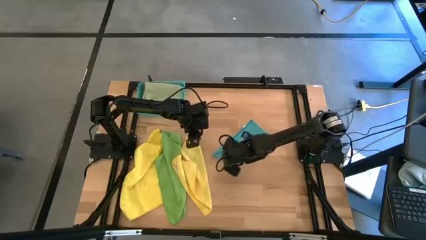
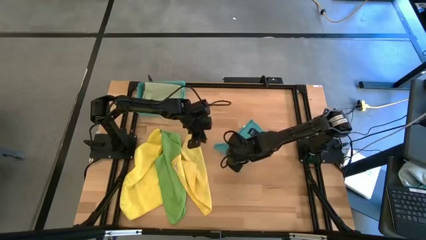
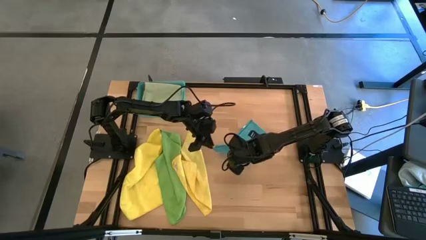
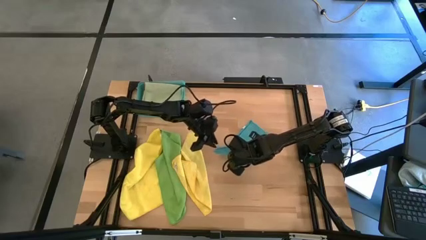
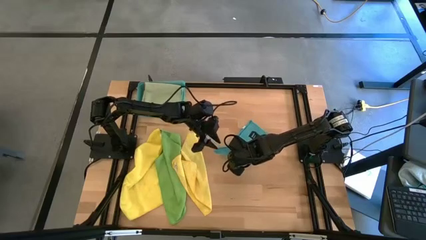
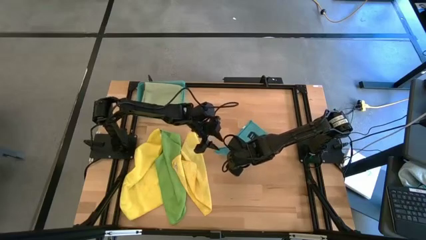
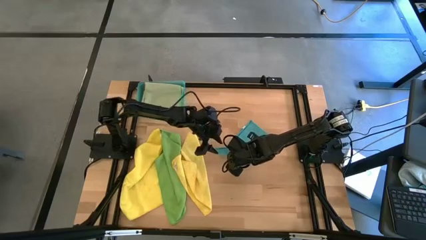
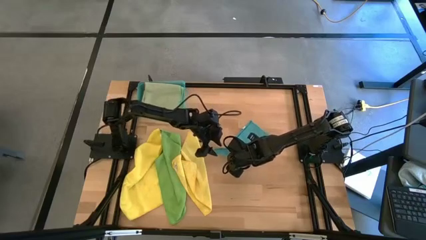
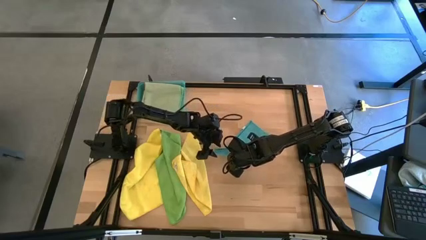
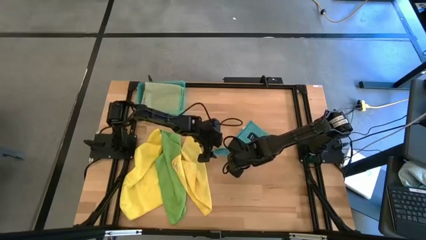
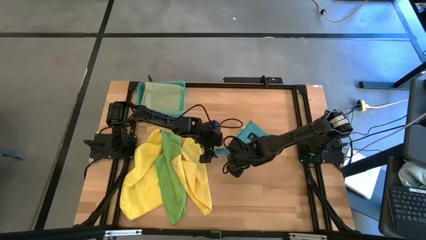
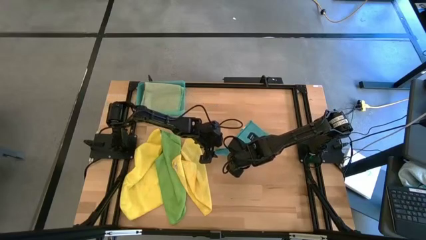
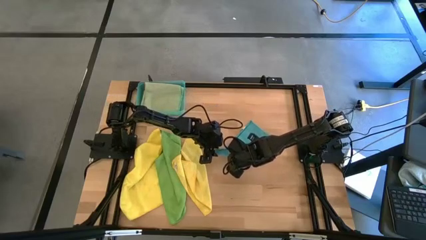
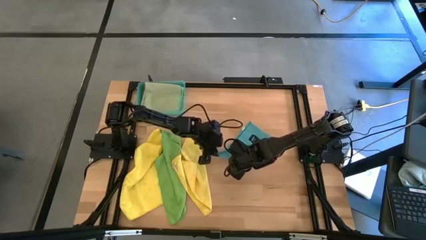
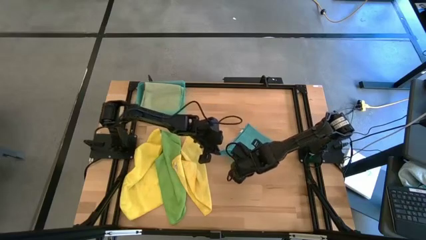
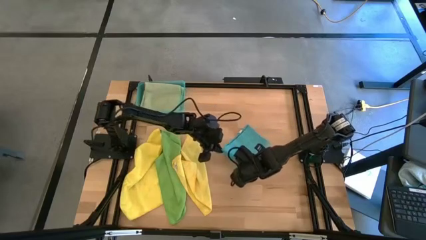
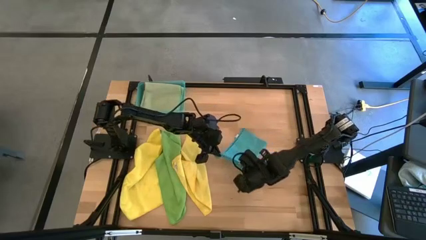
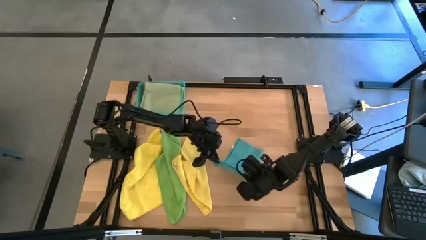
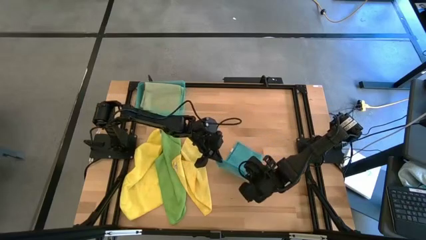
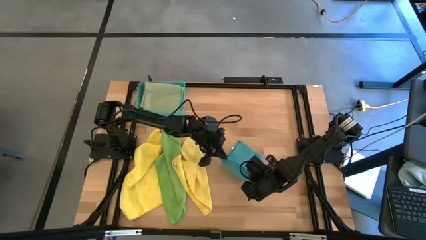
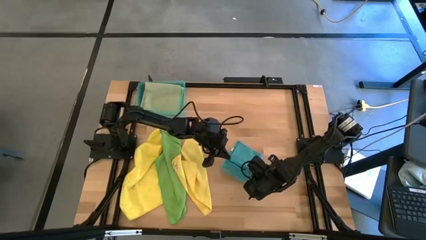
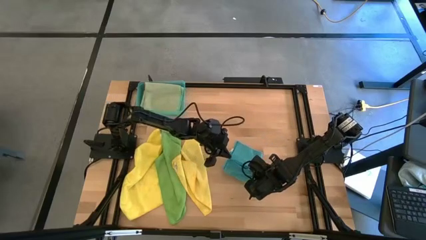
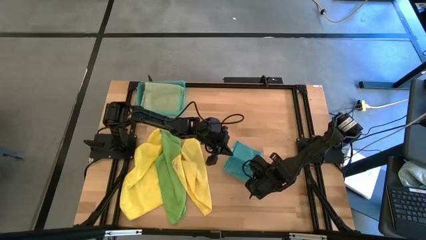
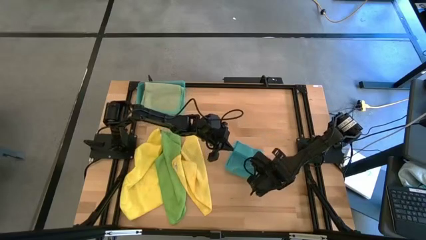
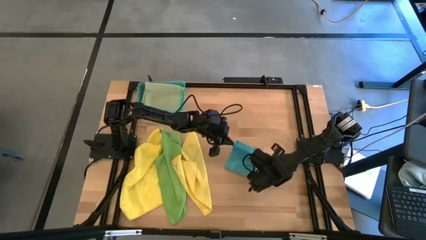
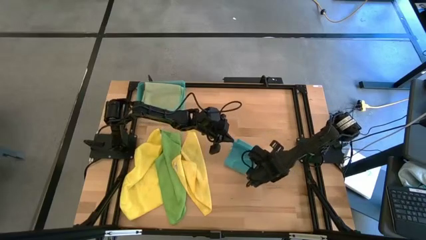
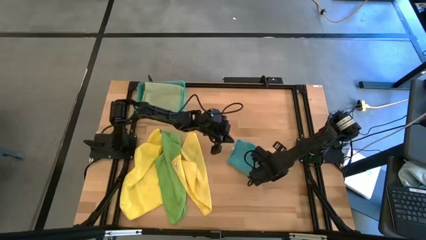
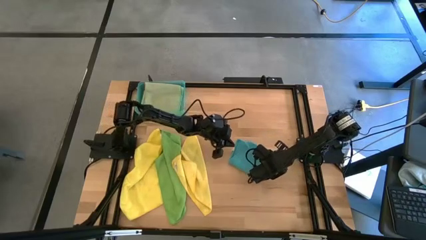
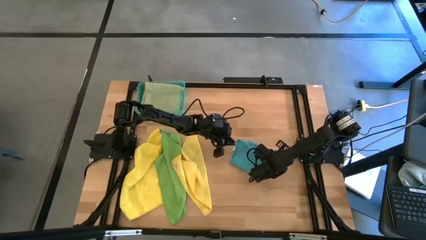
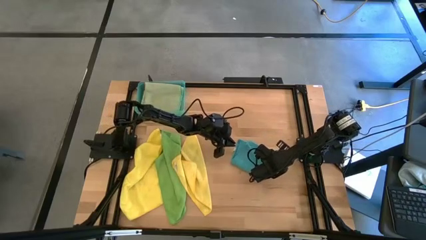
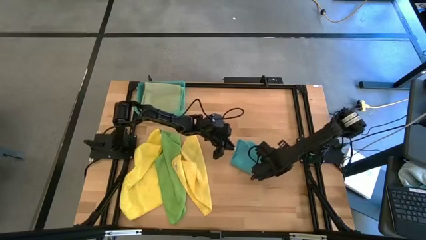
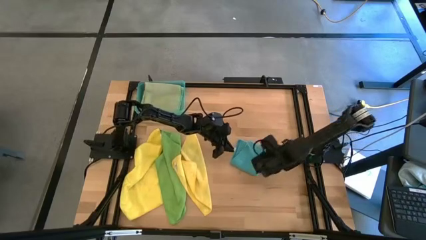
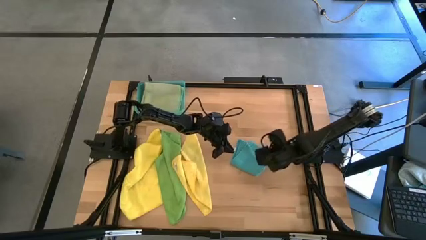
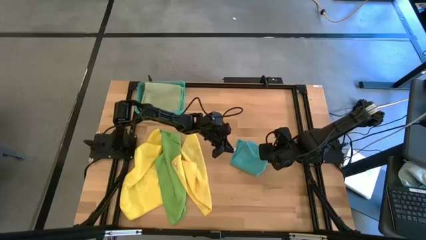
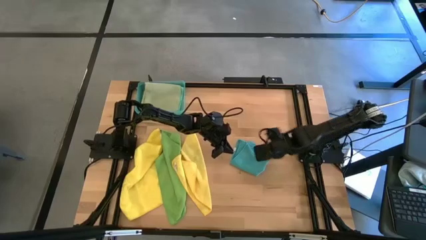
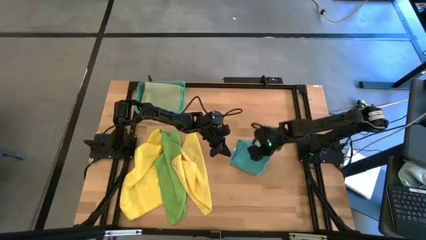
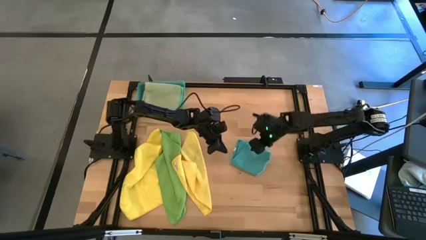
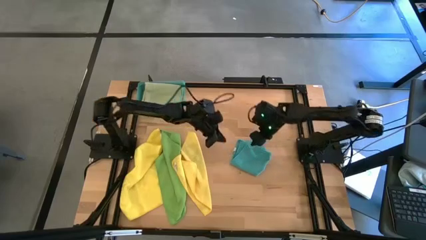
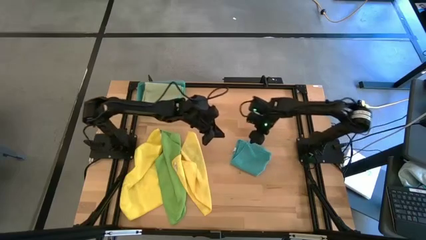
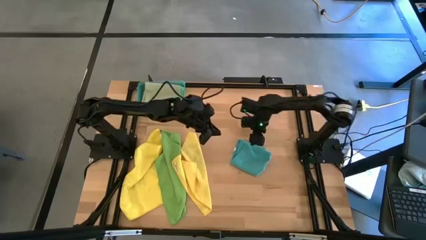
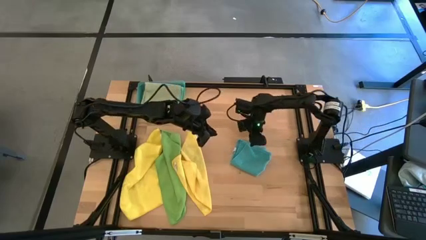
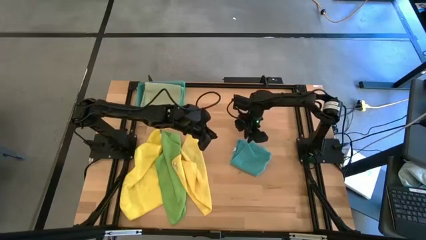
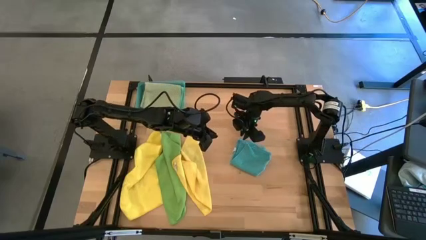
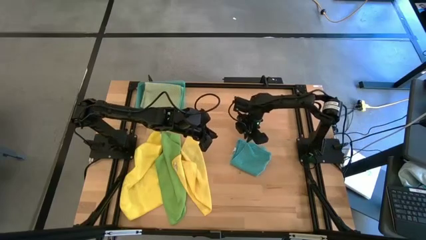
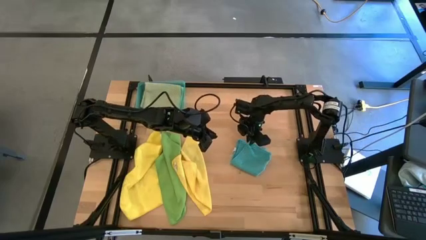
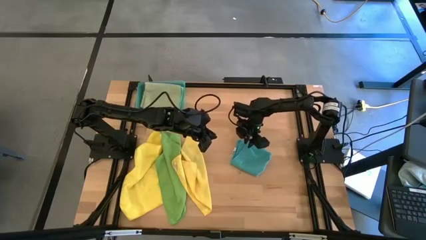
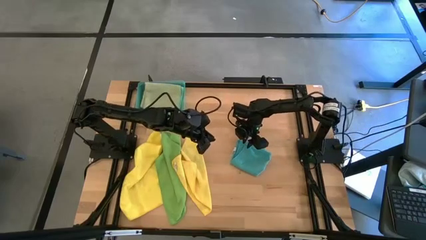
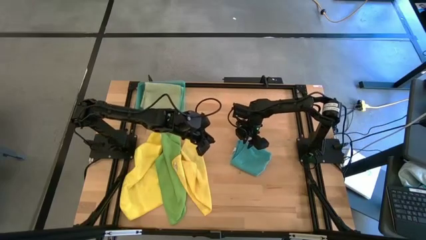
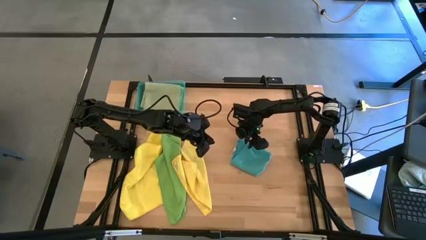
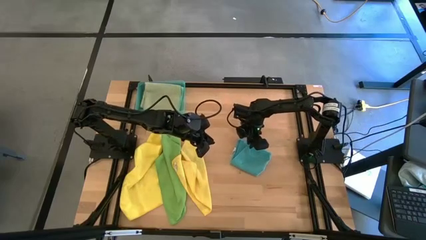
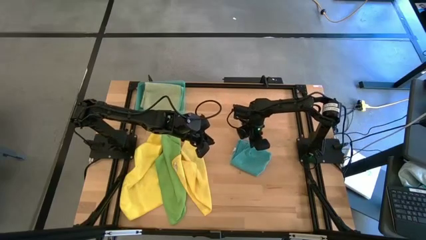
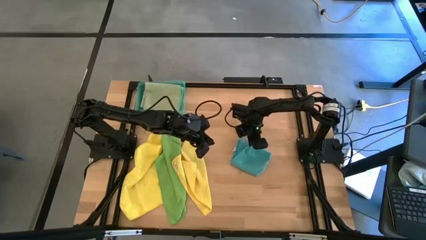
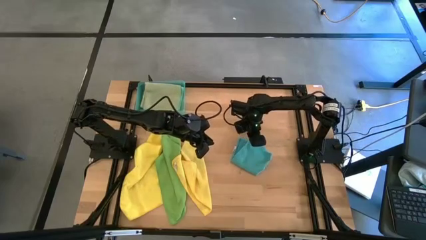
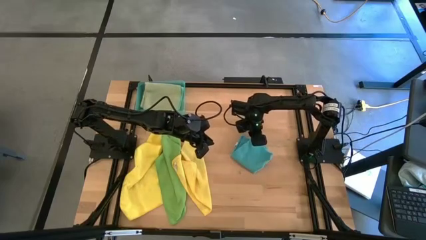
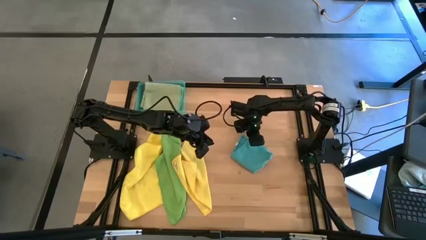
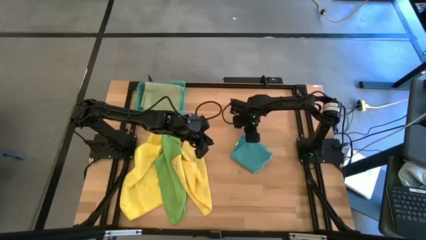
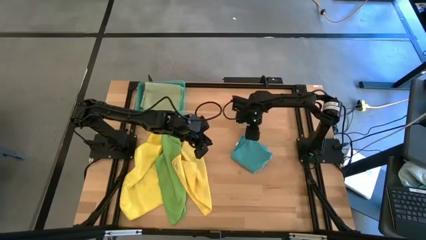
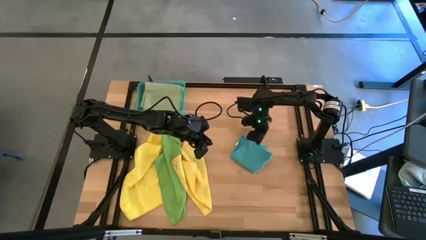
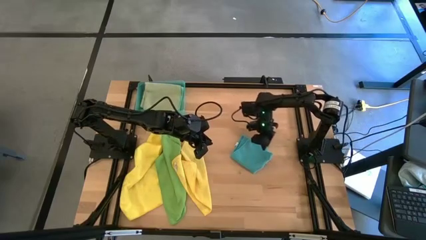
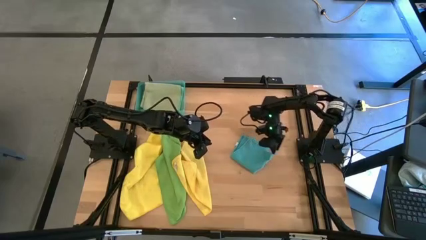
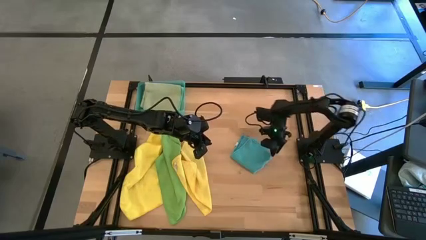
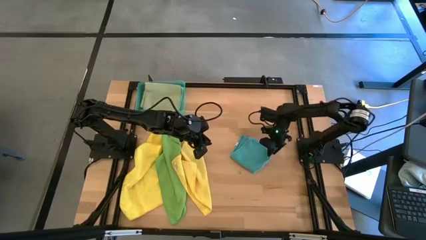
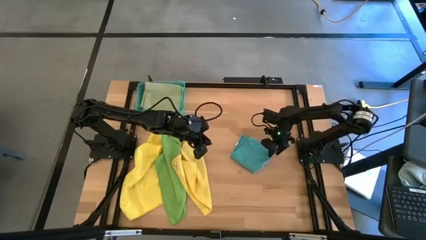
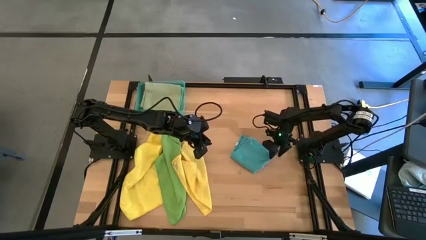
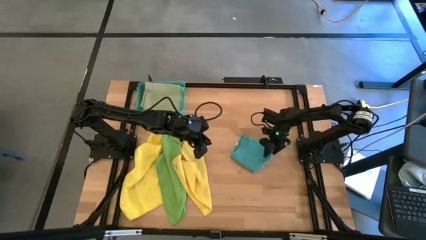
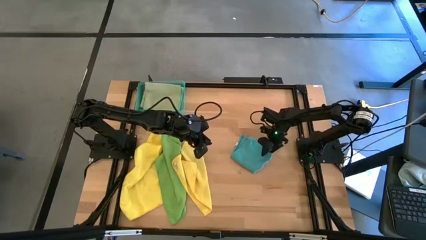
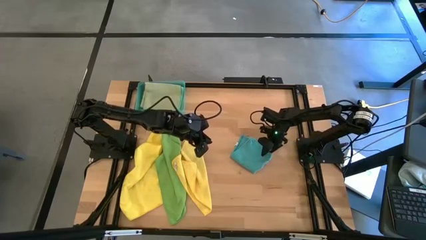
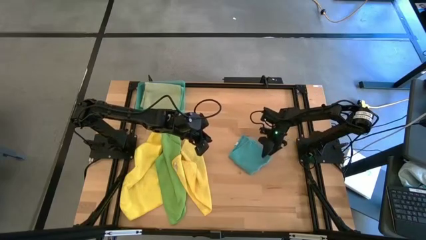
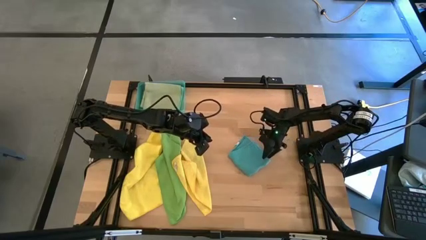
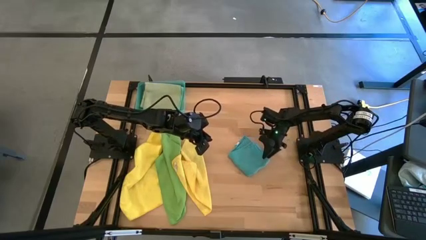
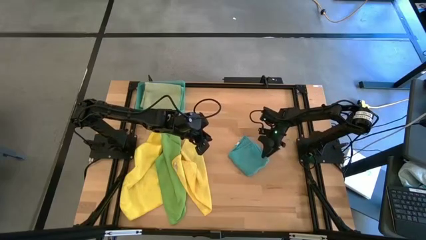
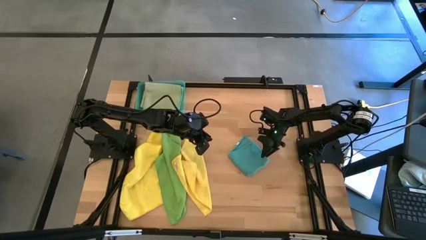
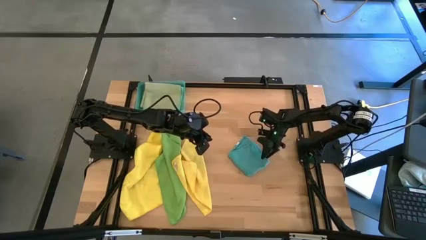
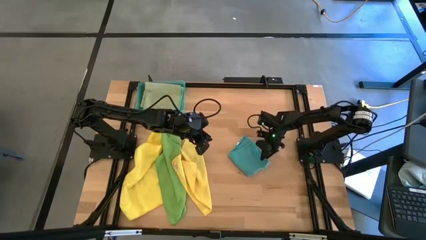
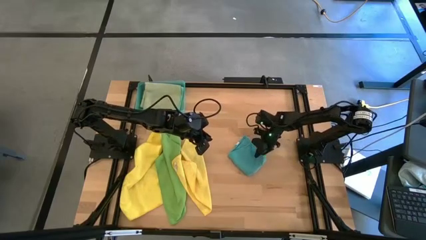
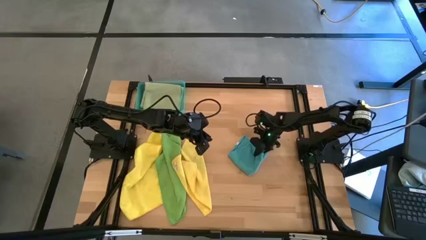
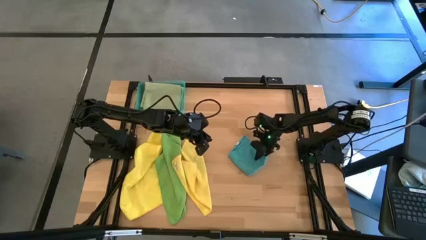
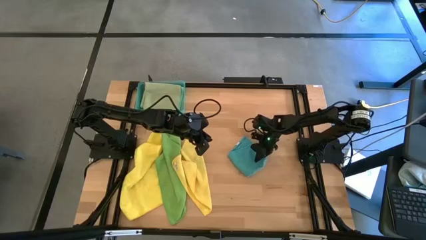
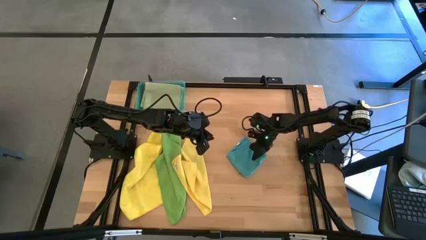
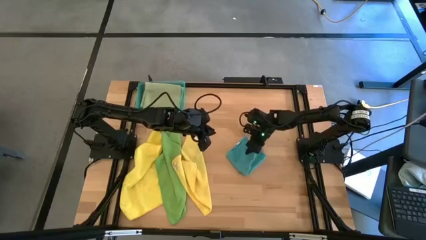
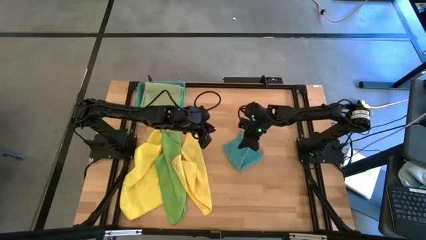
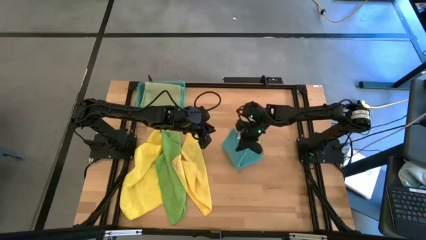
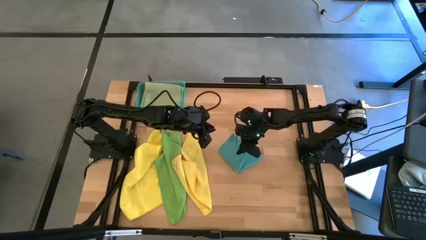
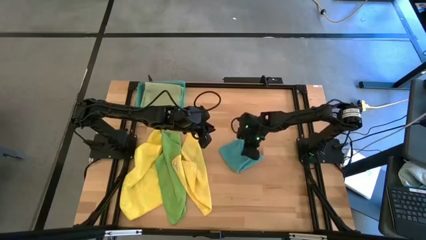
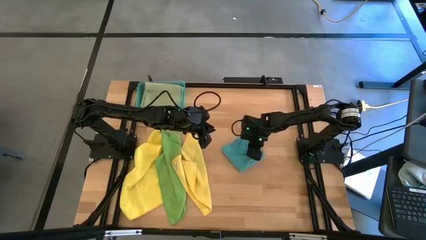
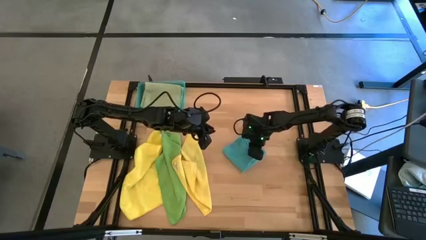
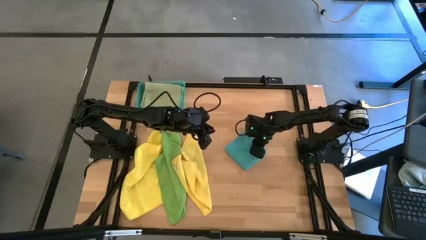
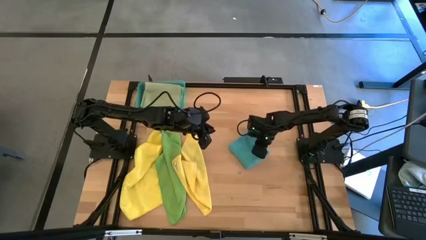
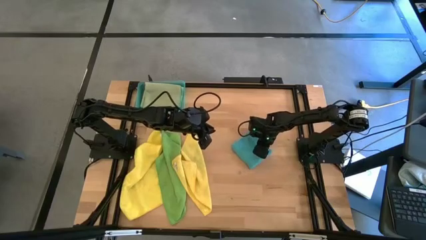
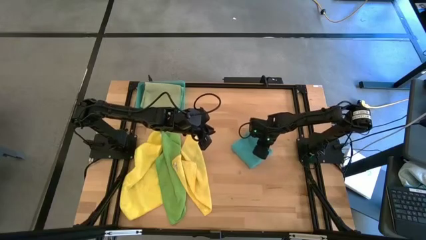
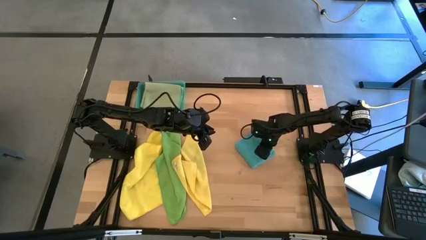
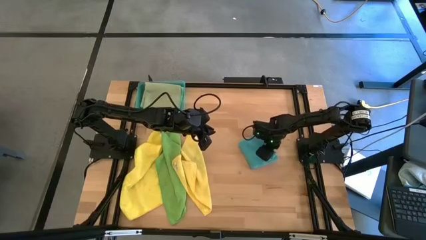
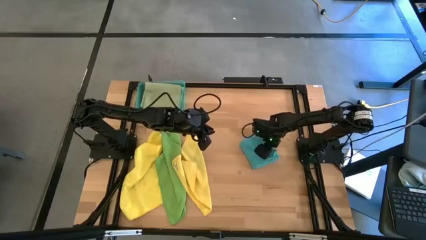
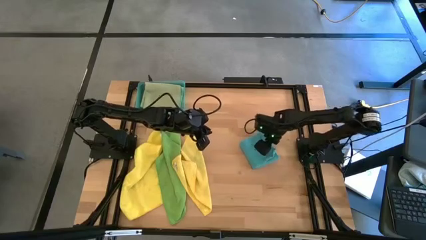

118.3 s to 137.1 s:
Task: Fold microfiber towels
Fold the blue microfiber cloth
